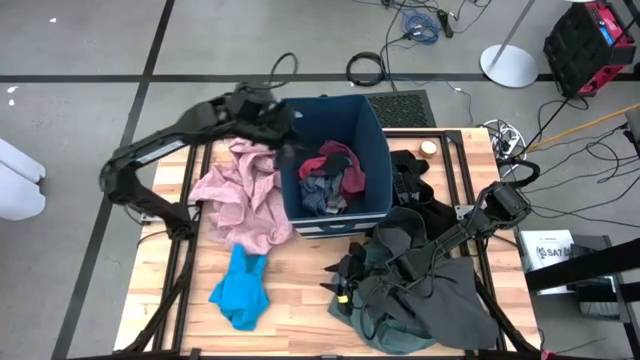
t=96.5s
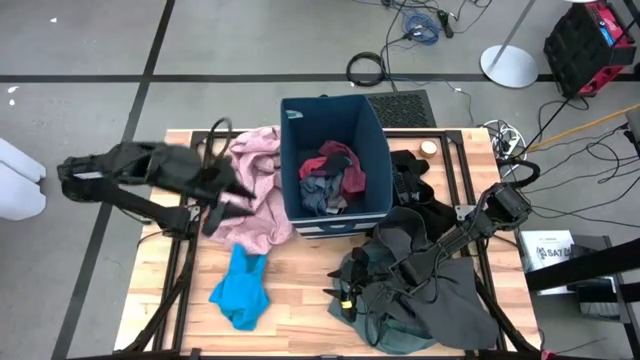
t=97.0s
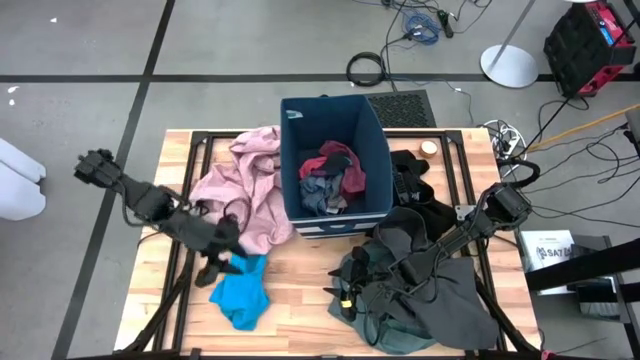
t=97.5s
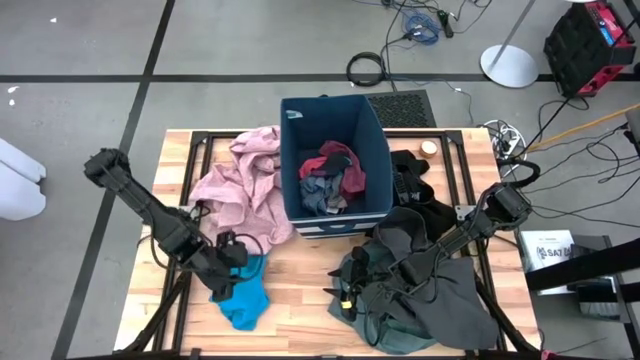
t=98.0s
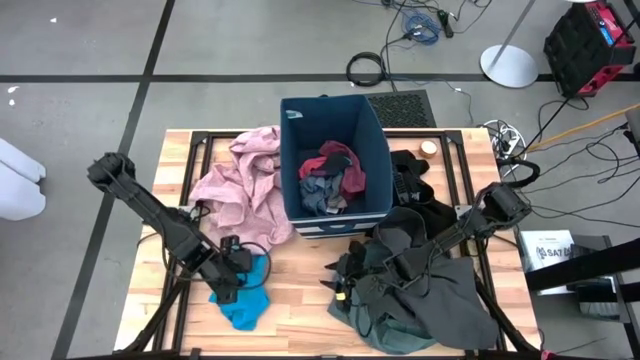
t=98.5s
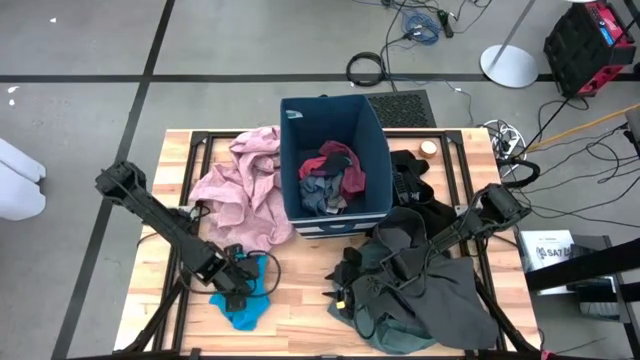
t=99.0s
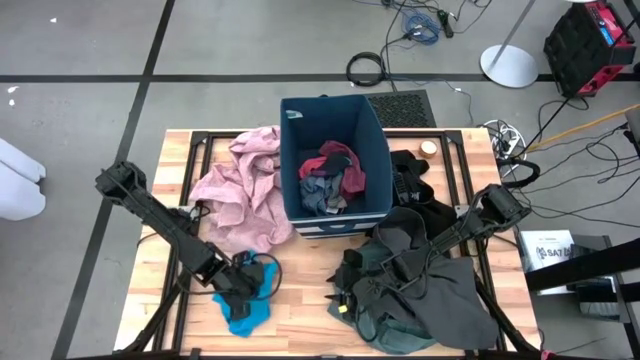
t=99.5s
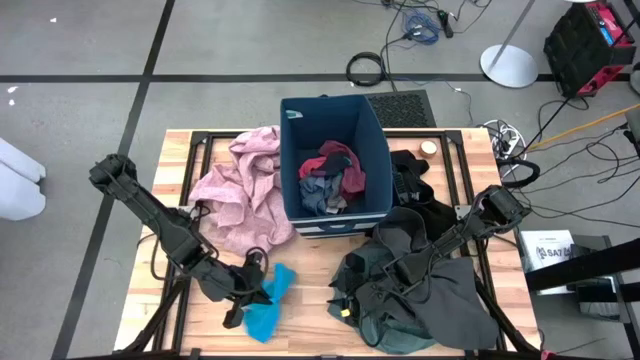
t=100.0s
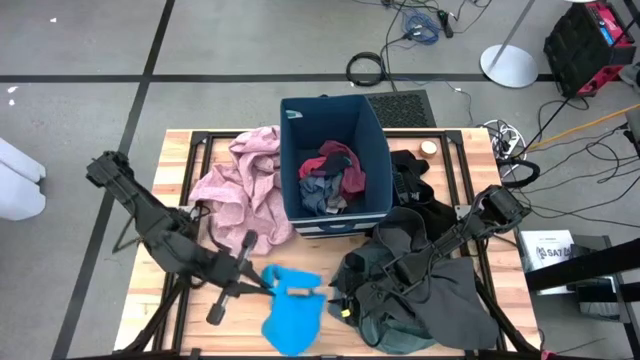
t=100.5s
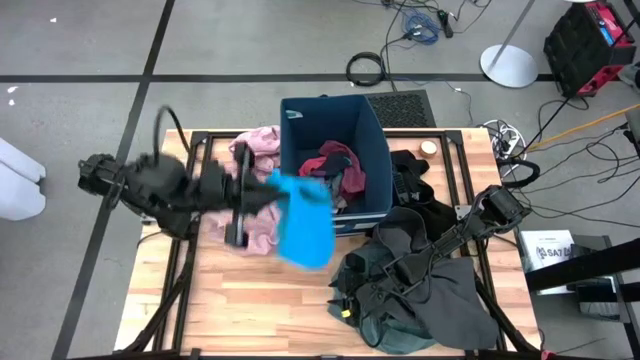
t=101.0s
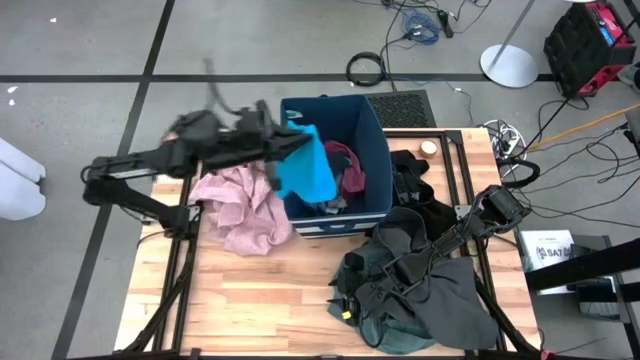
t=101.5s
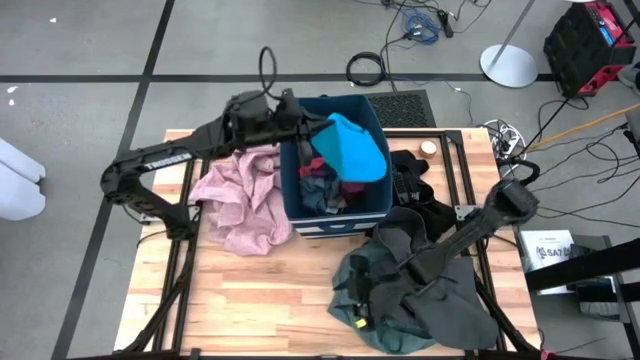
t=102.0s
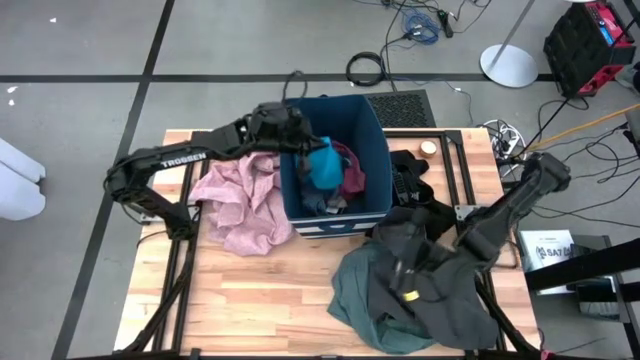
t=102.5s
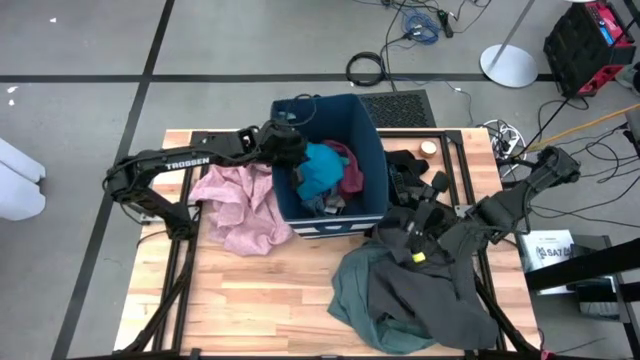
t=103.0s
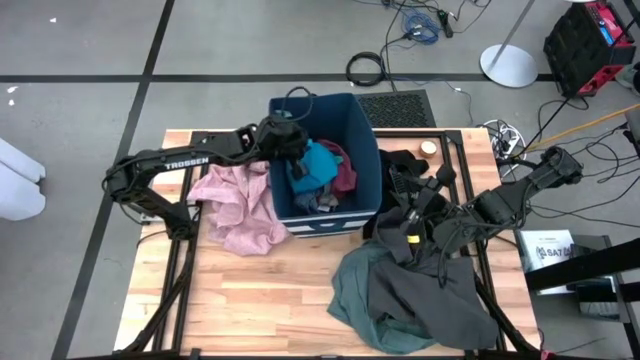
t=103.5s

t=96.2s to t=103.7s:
Task: Sort clothes
Put the blue short pants into the blue laundry organizer

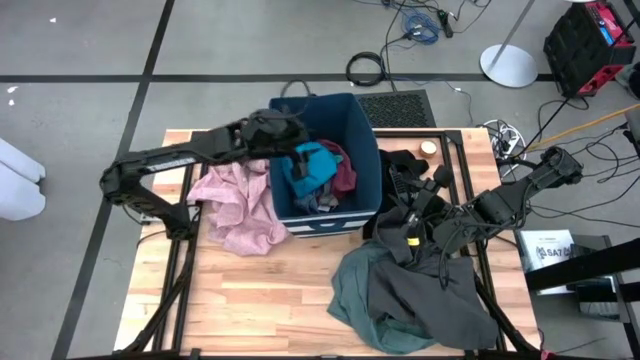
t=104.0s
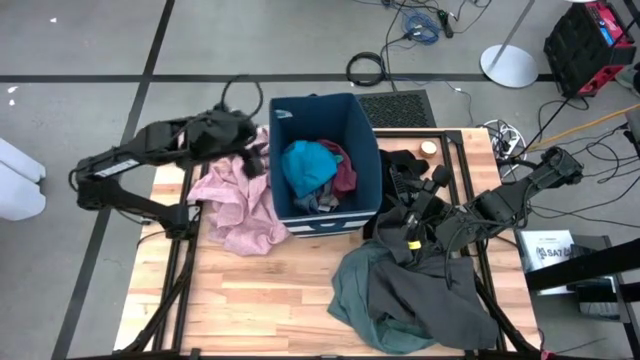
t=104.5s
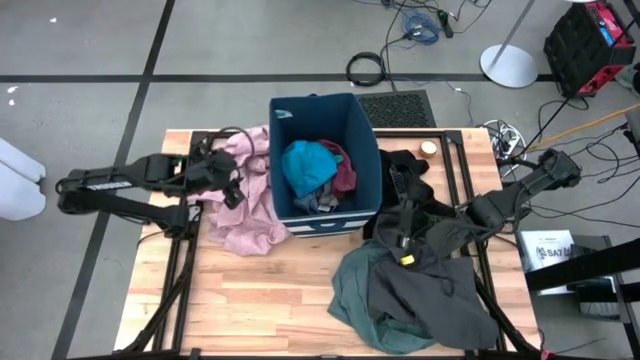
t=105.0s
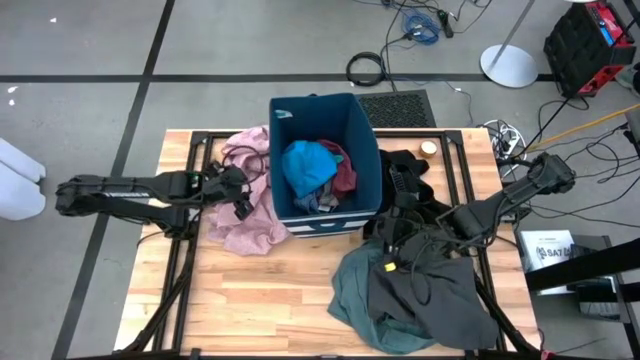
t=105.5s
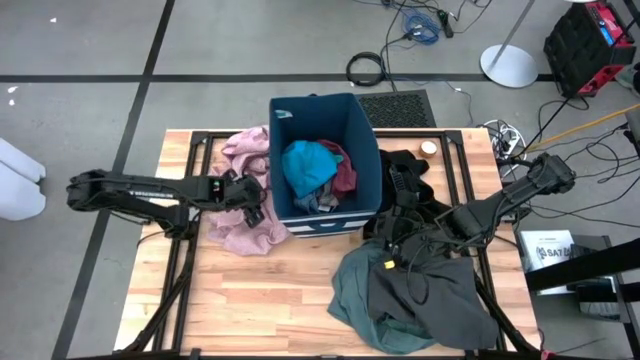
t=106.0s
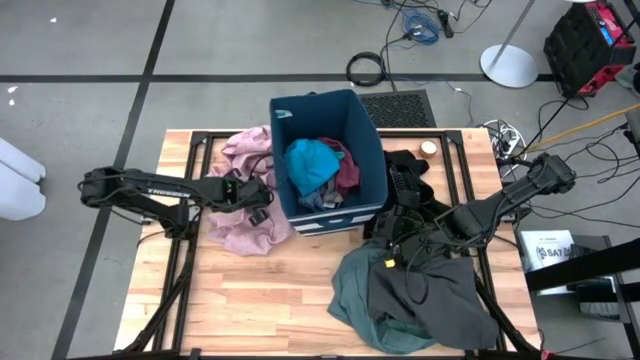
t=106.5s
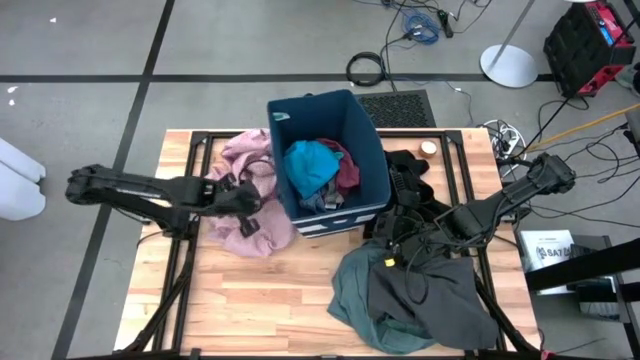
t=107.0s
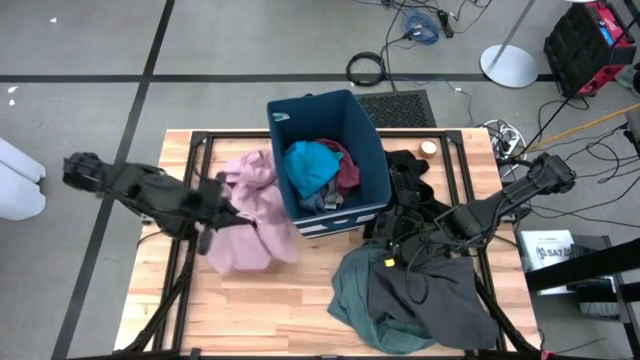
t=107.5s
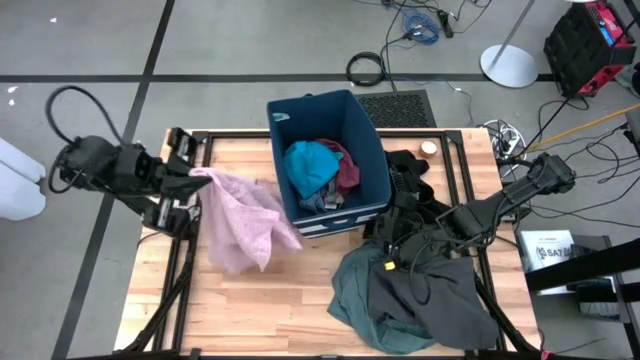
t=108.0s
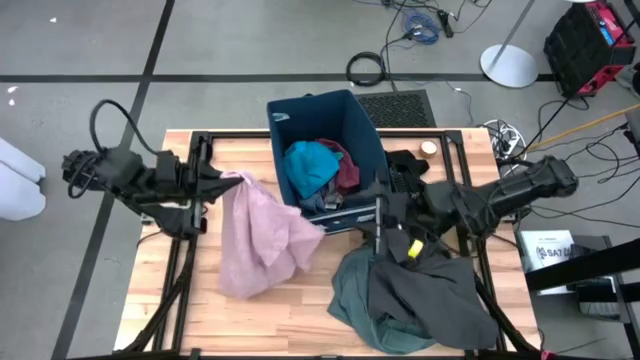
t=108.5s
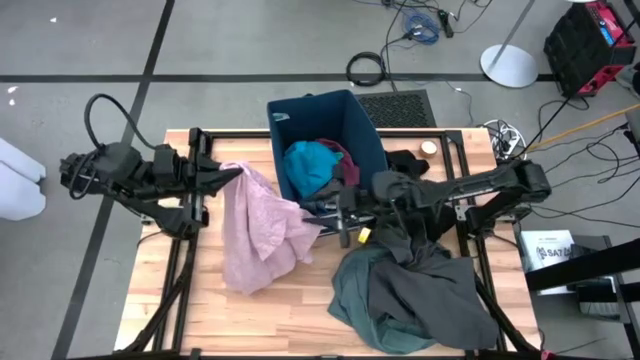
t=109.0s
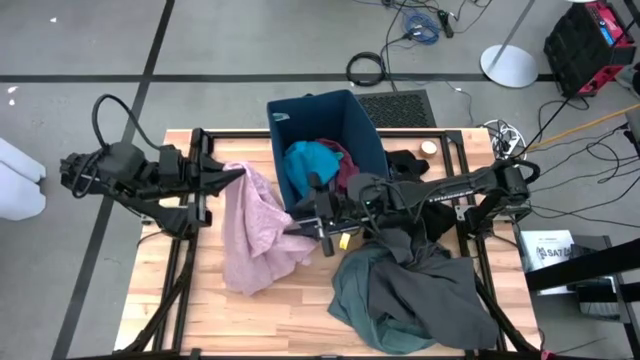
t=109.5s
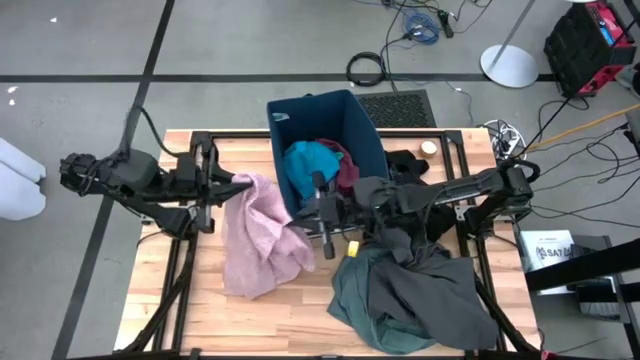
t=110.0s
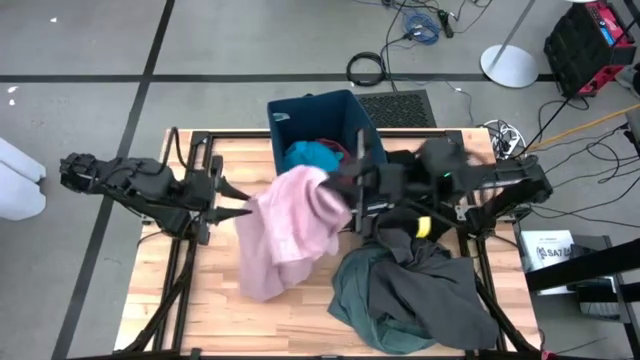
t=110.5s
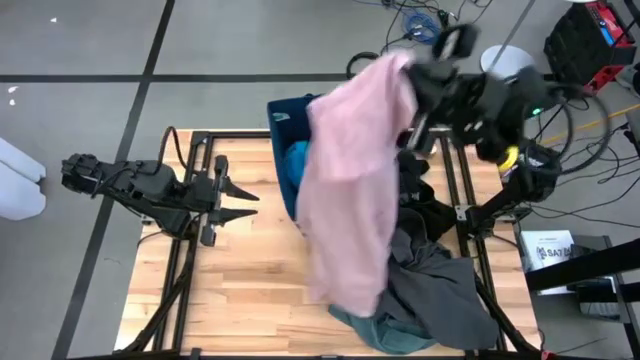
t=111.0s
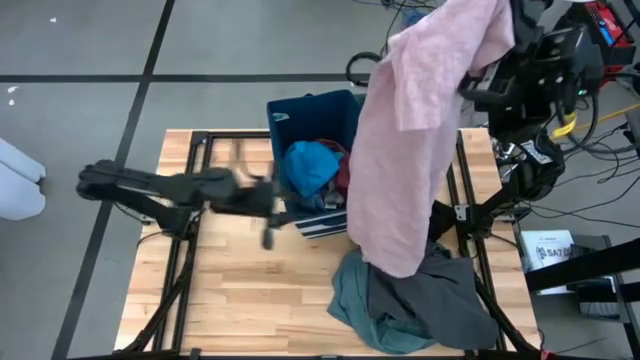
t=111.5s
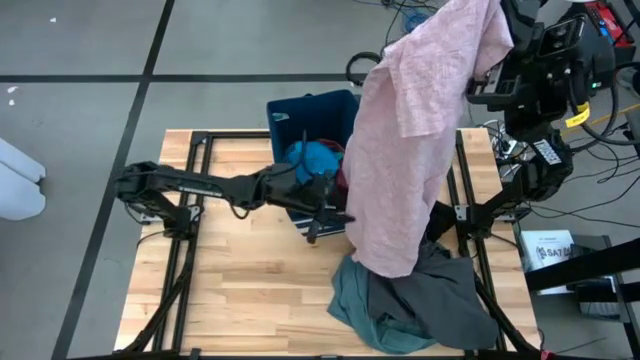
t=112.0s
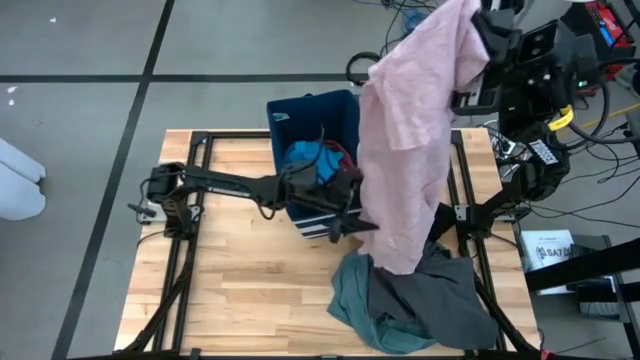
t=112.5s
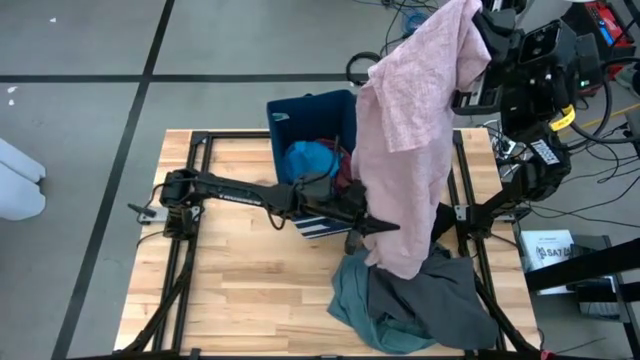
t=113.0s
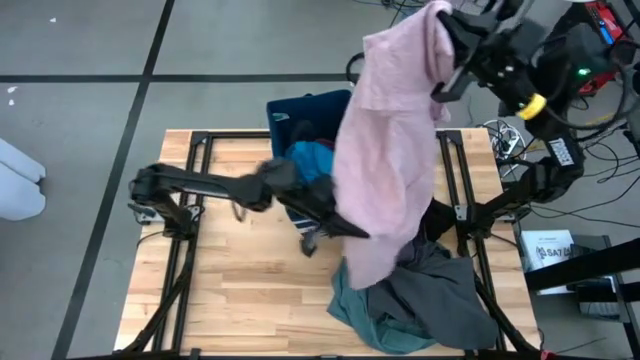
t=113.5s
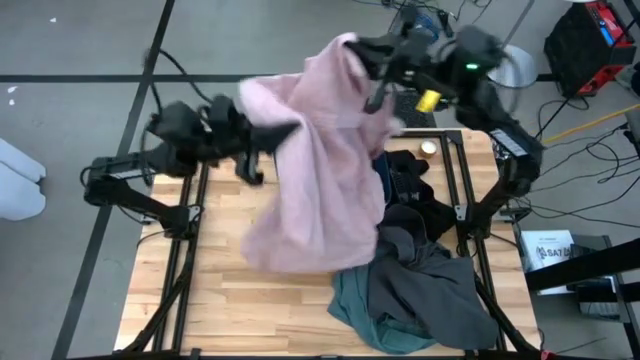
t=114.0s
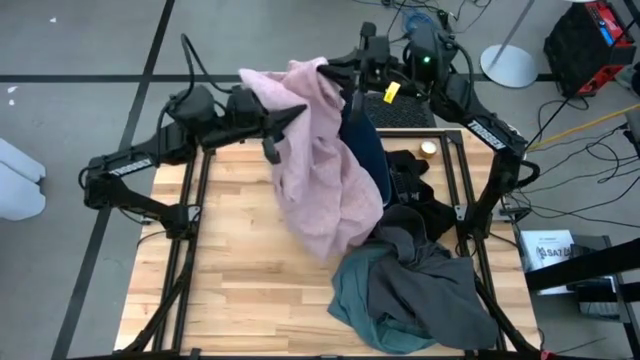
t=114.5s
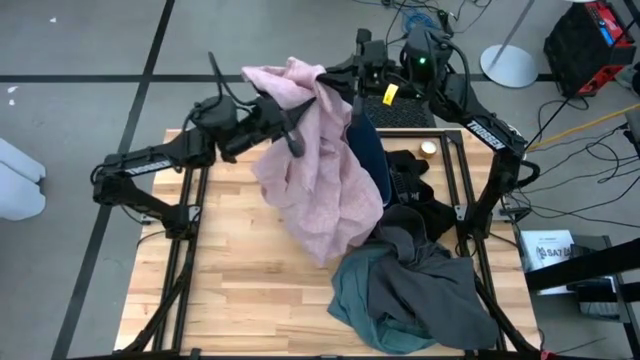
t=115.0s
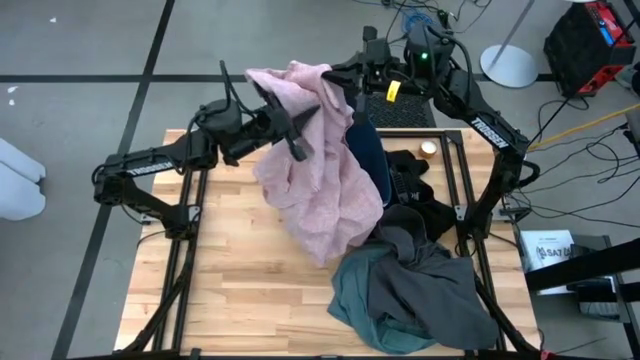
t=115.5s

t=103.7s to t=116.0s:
Put the pink polo shirt into the blue laundry organizer

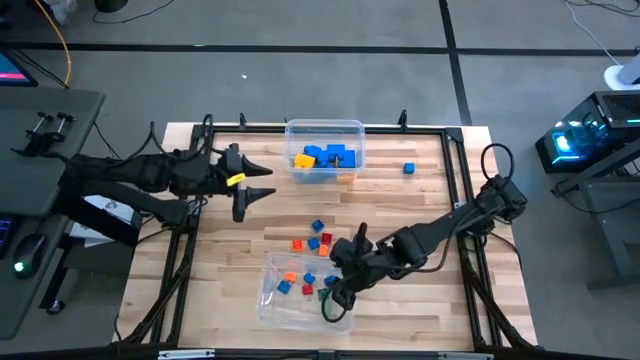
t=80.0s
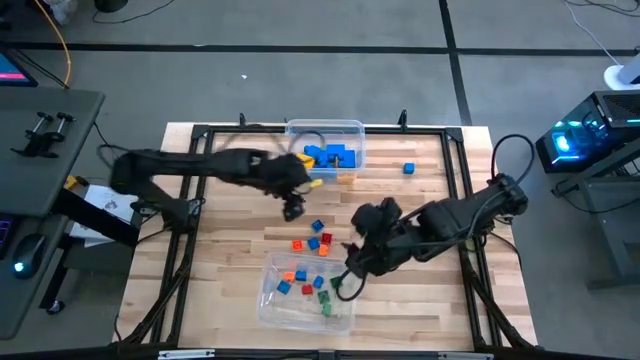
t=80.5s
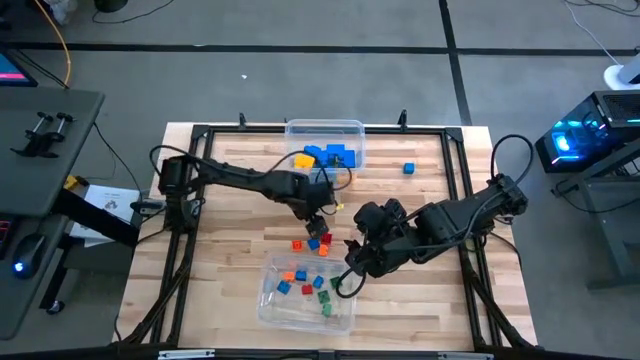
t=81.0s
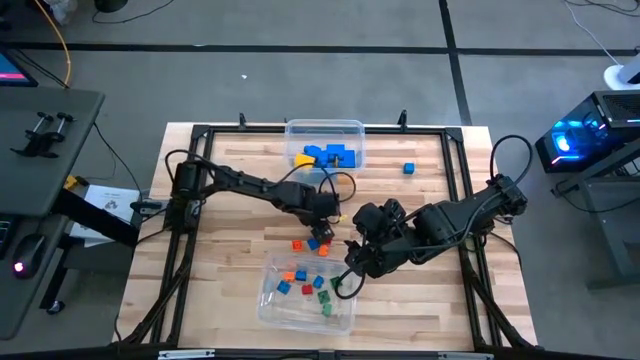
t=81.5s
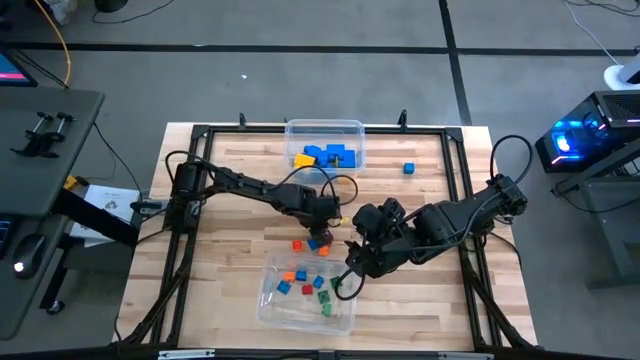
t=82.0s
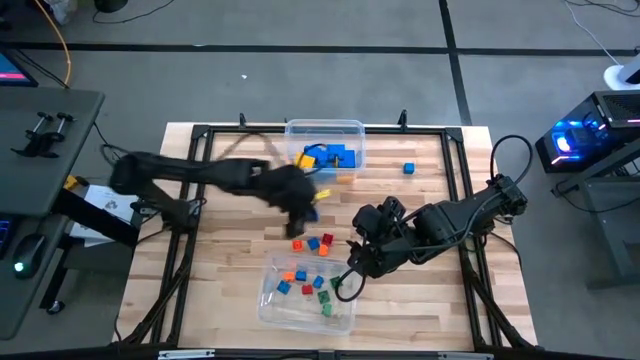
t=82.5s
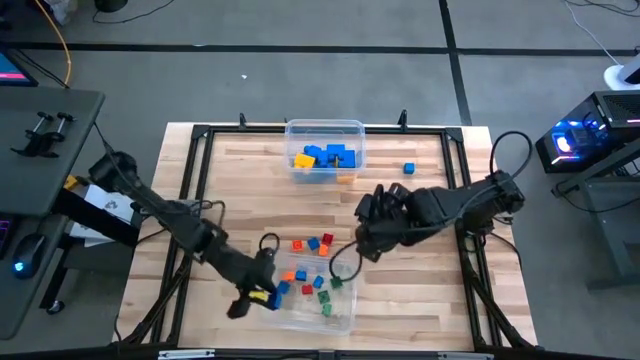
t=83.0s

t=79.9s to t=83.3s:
Task: Sort blocks by size
Put the small blue game piece into the bottom transparent bin
